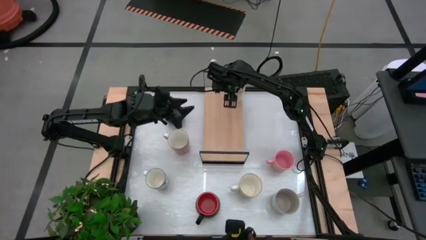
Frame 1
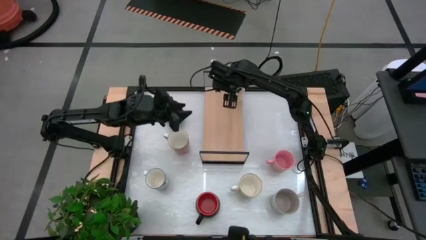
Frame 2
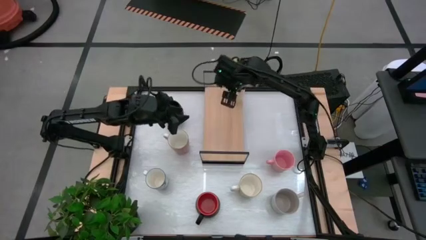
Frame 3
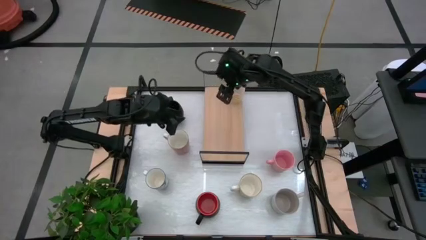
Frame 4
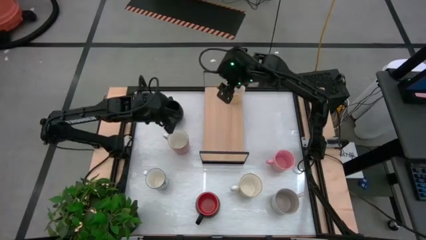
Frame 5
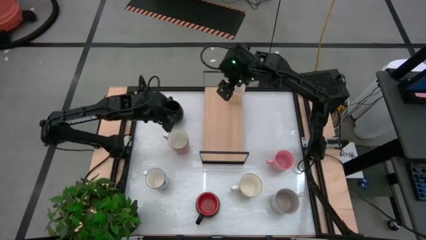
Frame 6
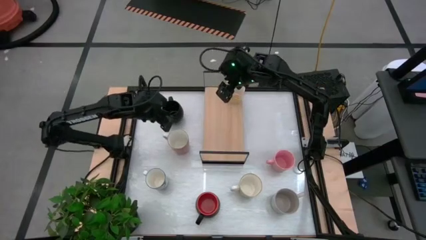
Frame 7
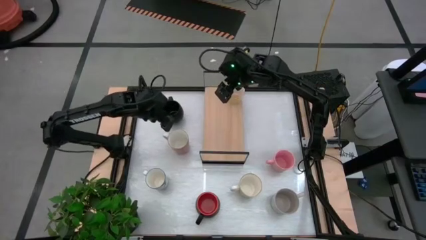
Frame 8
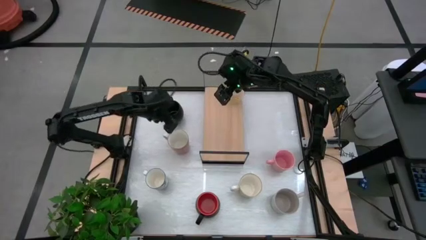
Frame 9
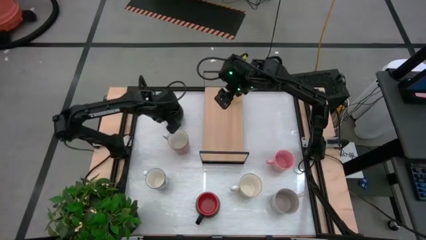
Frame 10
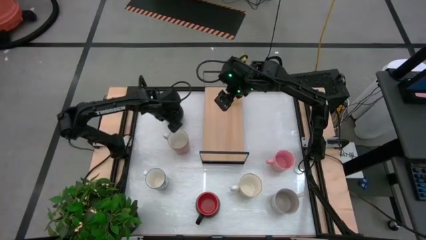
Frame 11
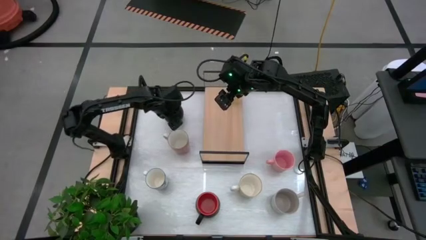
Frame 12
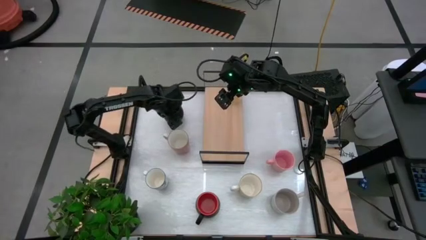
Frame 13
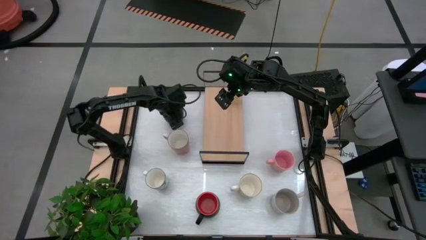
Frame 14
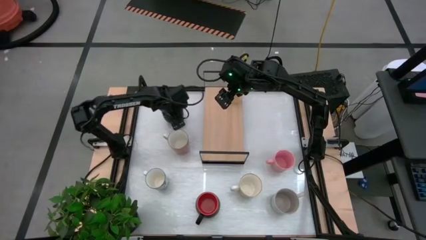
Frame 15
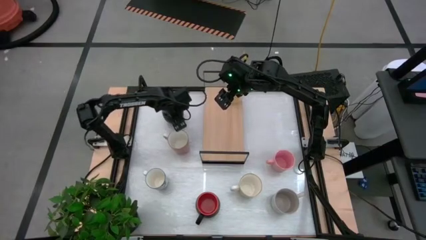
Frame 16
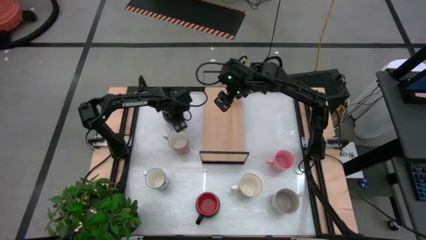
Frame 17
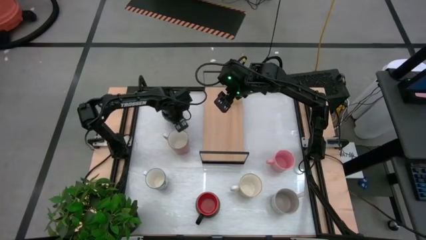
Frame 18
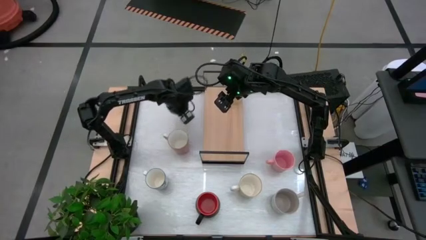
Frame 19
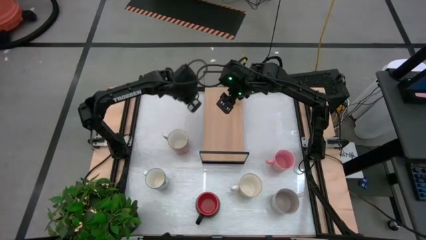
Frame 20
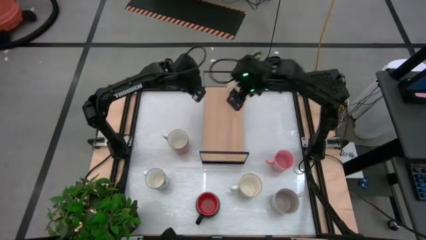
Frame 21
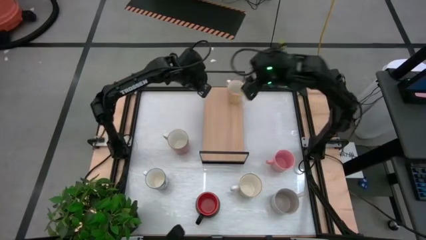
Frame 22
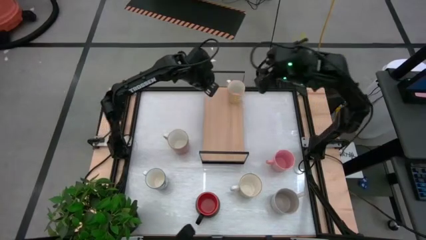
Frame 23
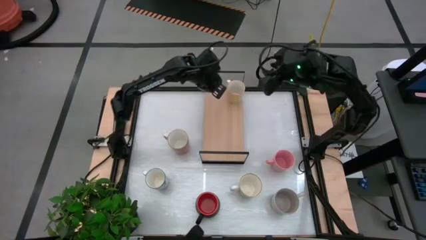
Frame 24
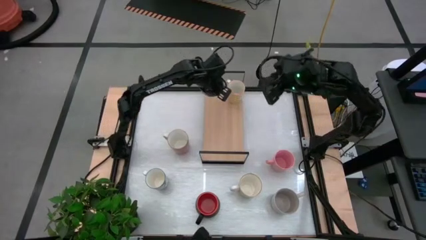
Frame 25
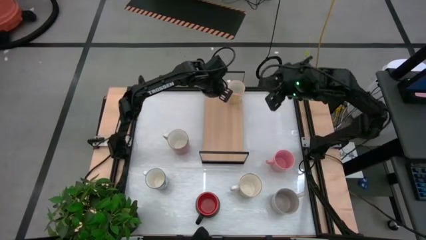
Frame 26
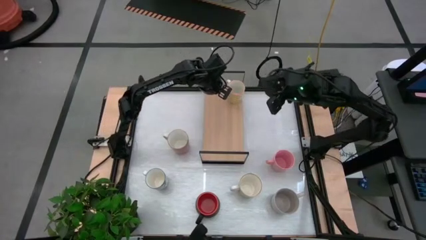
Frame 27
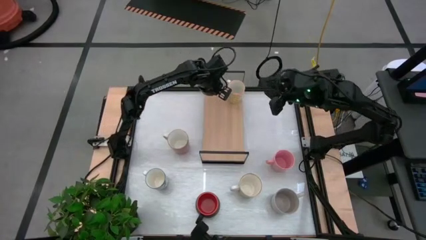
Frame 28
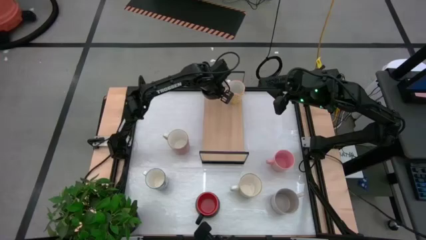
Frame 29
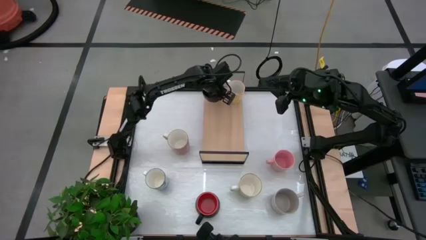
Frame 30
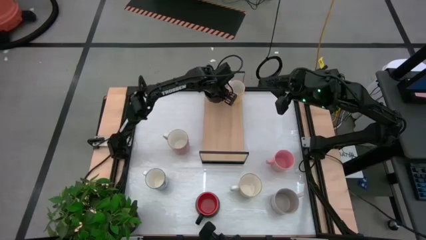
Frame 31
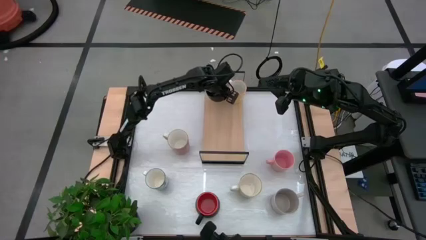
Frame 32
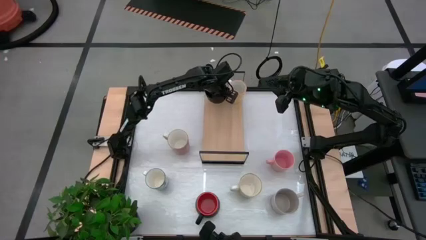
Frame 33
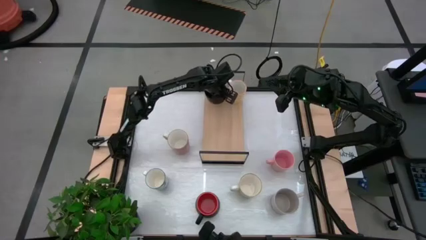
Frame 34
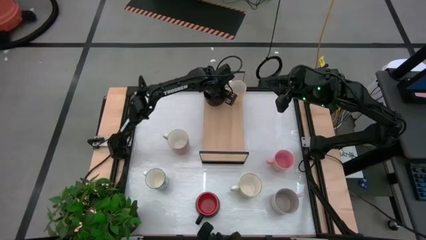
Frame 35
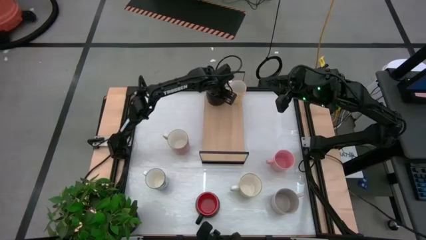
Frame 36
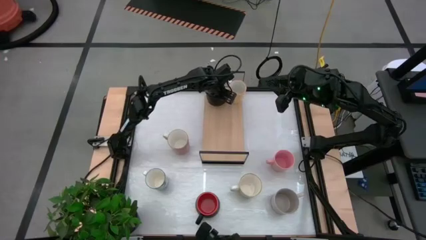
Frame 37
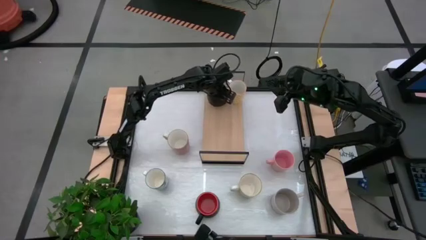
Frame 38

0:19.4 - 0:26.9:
Task: Place coffee mugs
Put the top black mug on the shelf

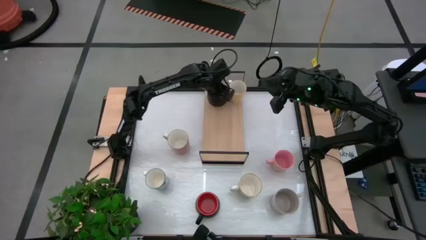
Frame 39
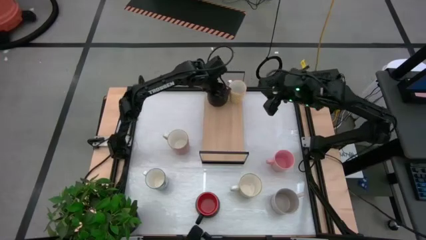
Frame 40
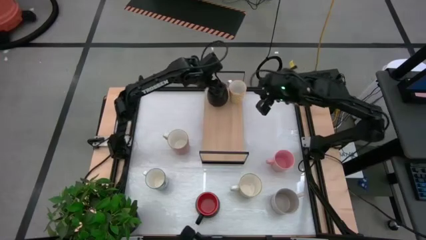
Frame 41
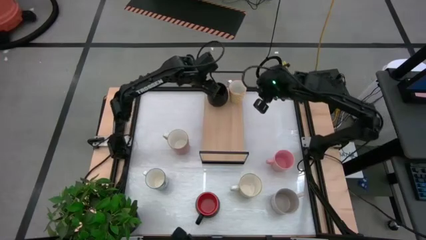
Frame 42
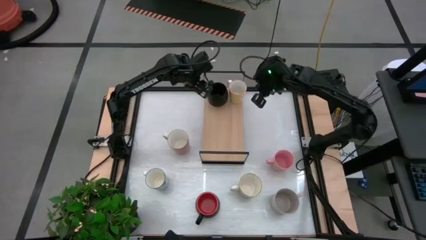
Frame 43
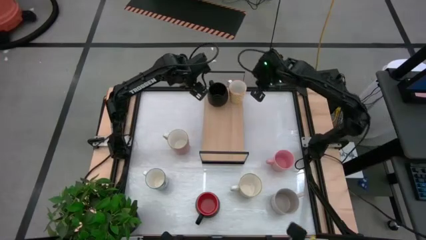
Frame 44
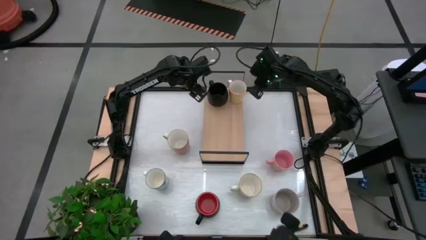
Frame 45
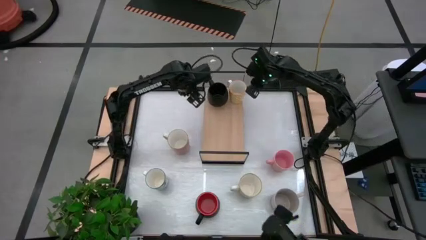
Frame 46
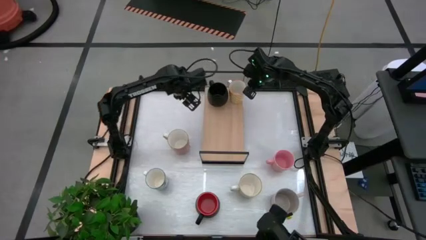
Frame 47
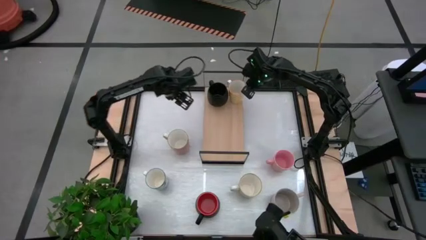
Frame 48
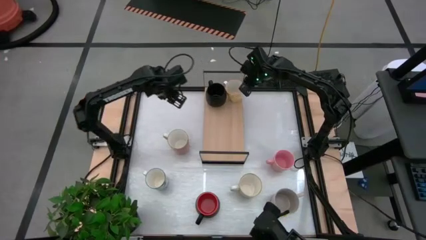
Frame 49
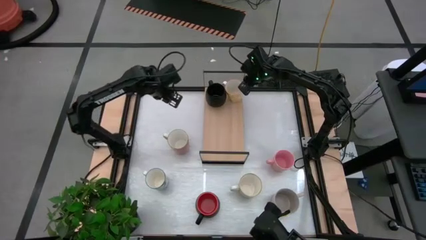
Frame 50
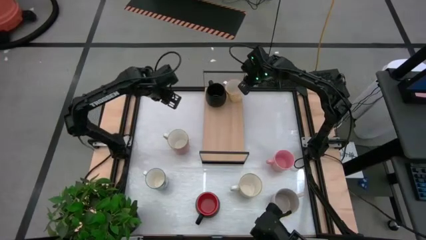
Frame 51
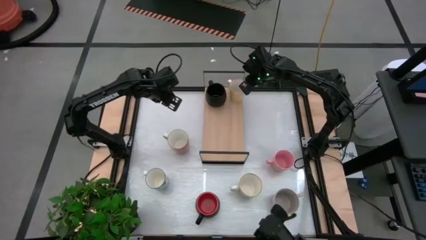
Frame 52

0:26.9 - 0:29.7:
Adjust the yellow pattern mug on the shelf

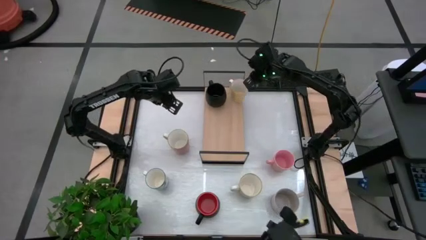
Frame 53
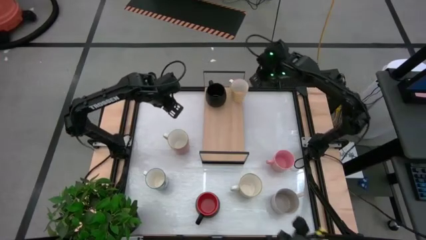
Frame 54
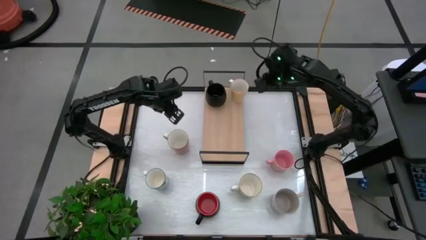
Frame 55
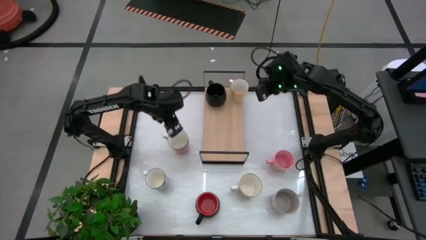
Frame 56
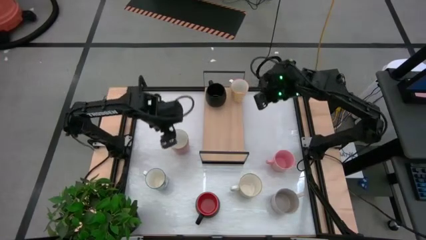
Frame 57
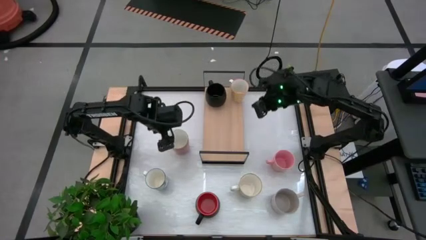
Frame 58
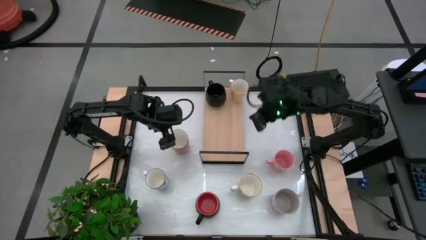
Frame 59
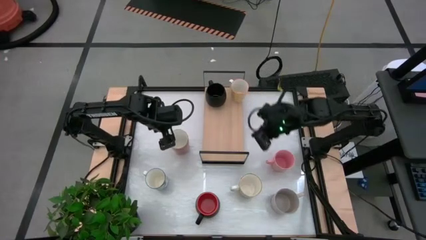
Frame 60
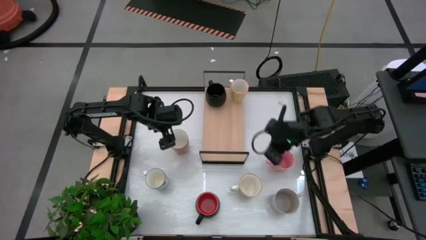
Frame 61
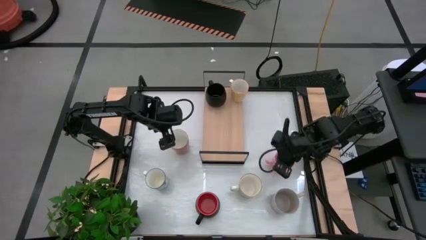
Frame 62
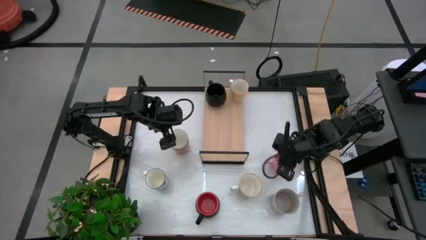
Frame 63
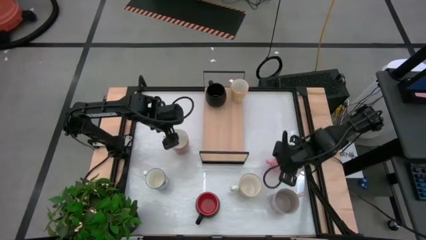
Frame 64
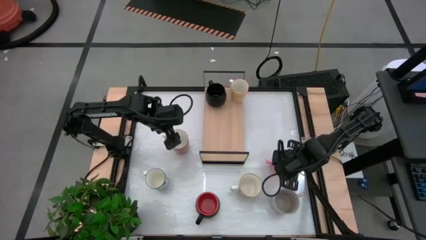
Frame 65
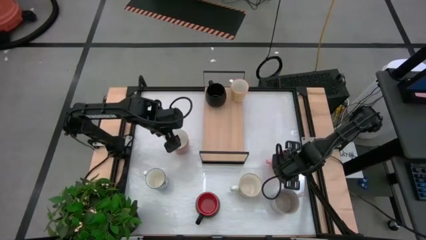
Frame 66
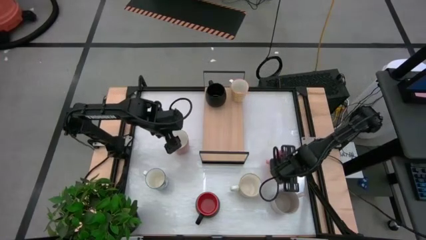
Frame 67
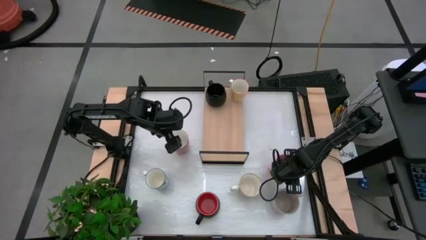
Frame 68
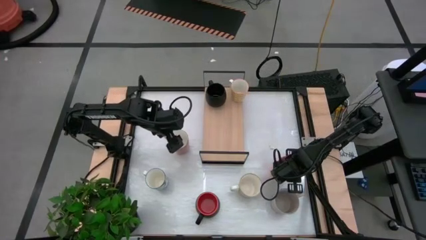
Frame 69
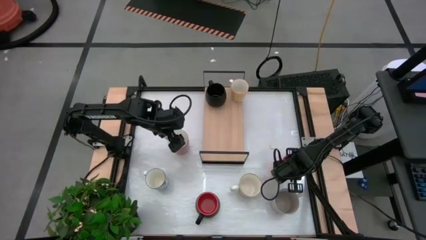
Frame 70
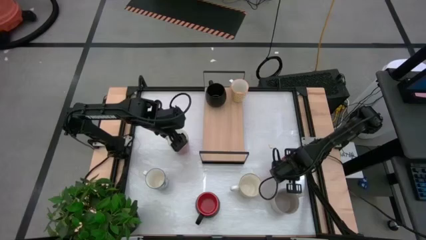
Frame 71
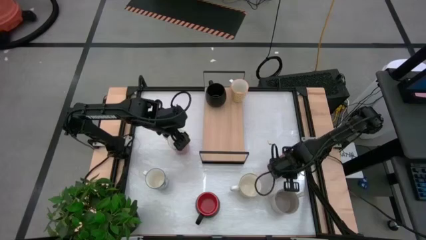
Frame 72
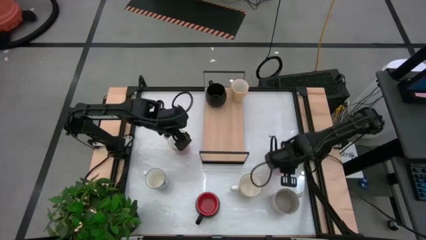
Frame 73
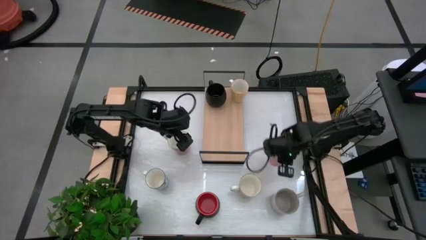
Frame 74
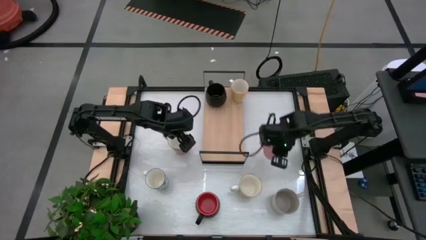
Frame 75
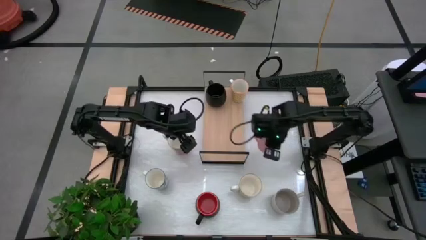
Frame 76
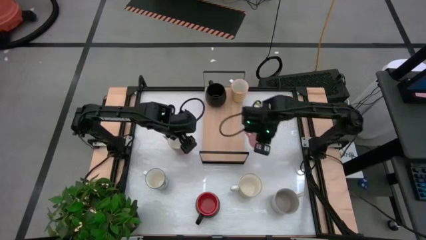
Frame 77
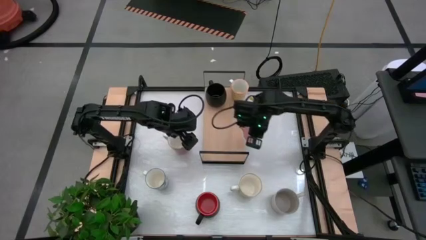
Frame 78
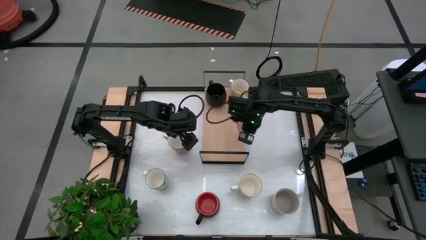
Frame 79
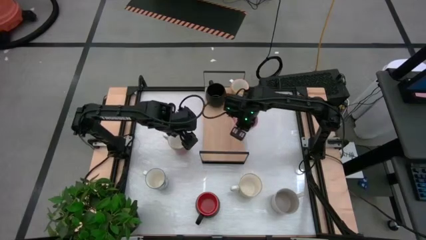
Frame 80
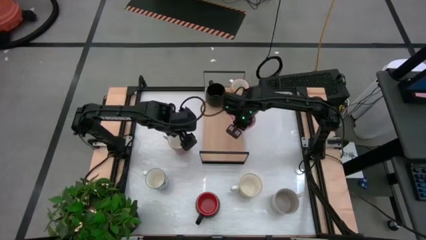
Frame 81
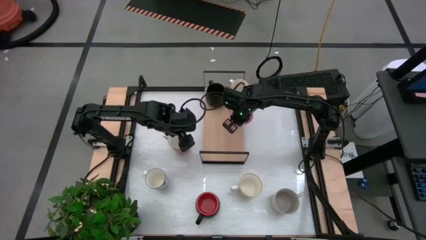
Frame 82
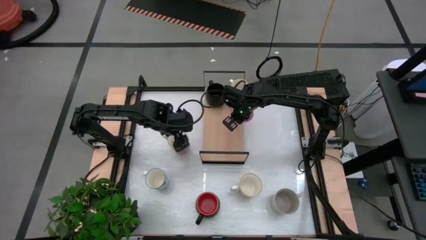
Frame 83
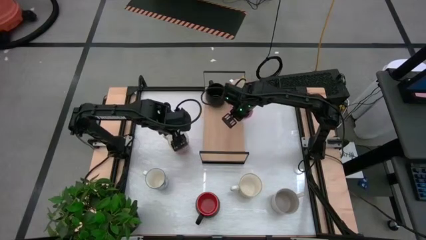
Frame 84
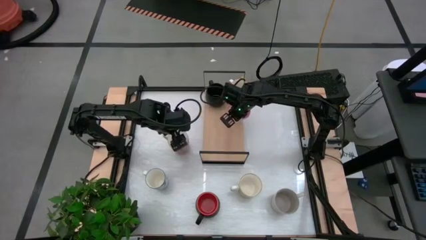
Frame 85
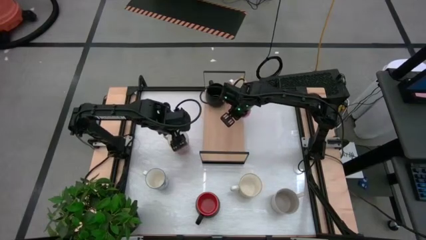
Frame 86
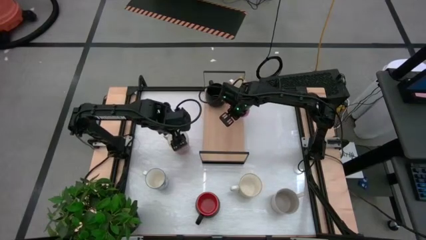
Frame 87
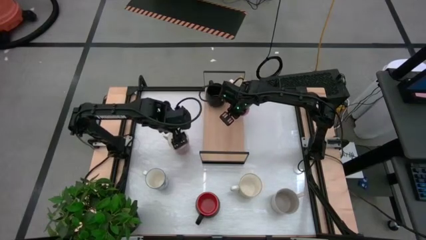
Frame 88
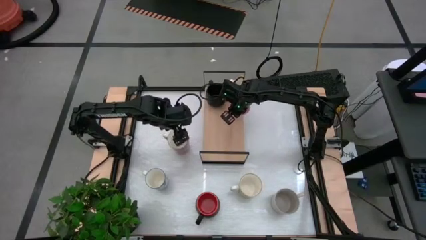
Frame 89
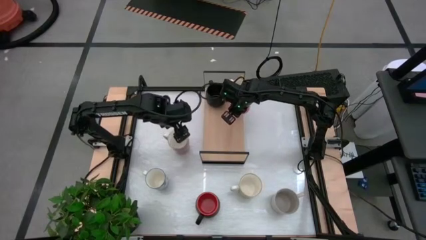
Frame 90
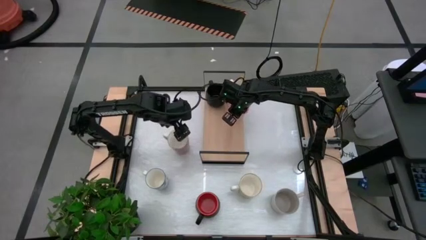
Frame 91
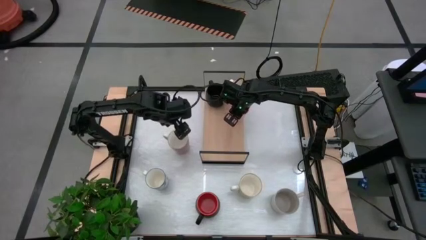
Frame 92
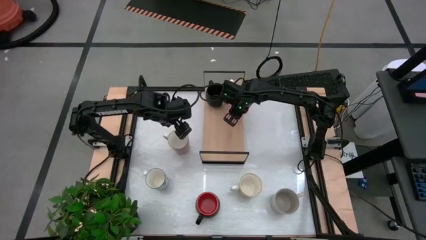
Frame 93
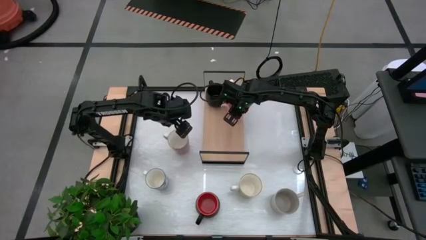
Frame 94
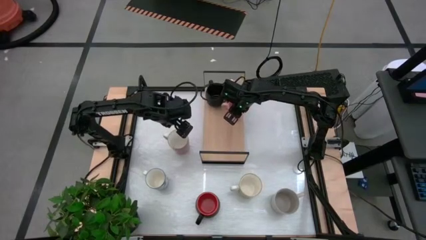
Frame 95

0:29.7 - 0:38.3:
Put the pink mug on the shelf
